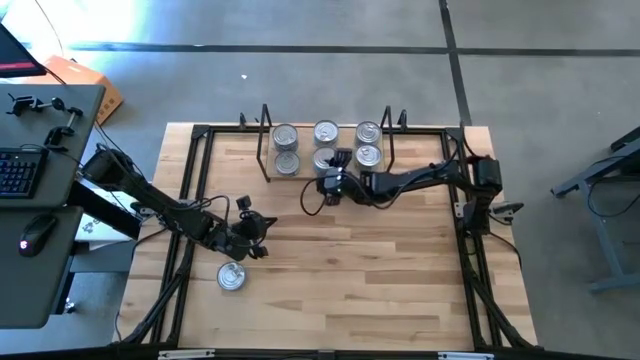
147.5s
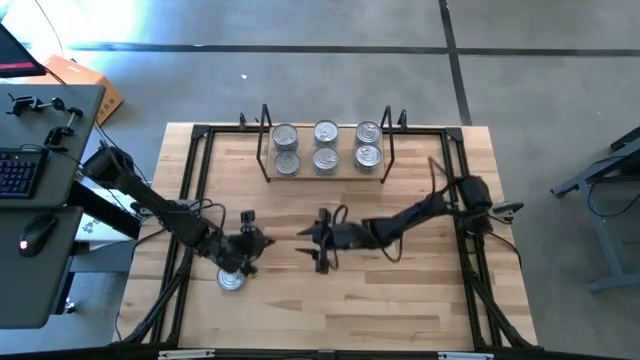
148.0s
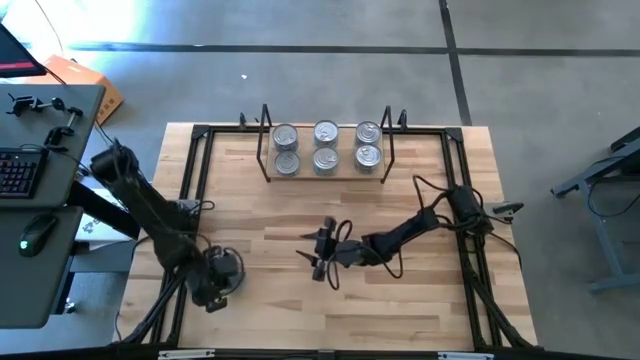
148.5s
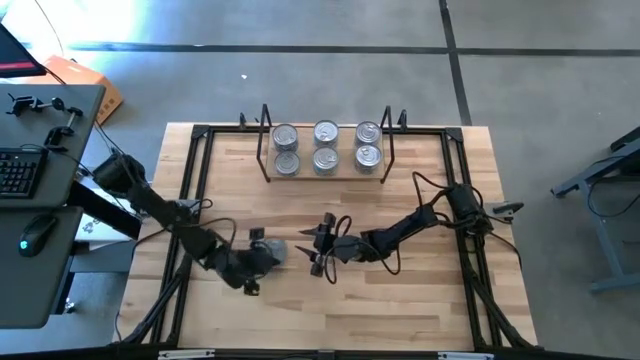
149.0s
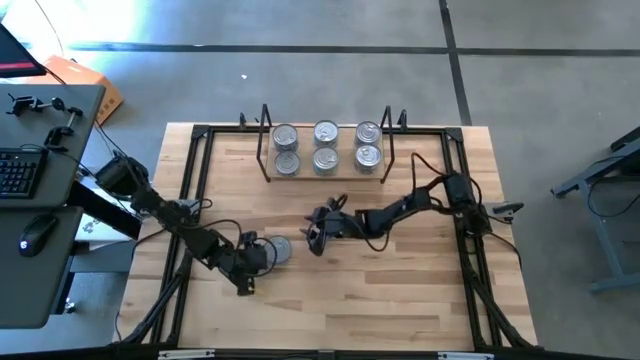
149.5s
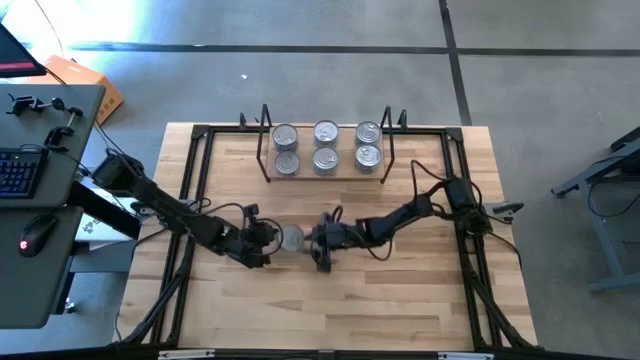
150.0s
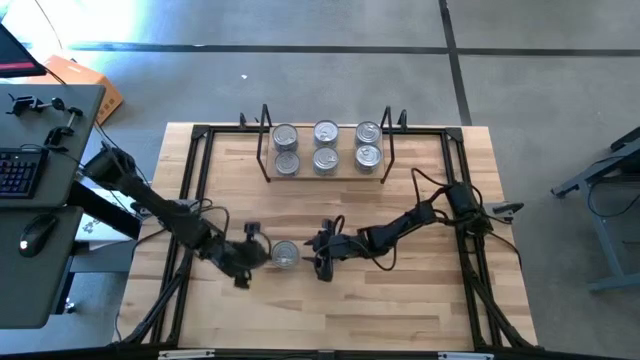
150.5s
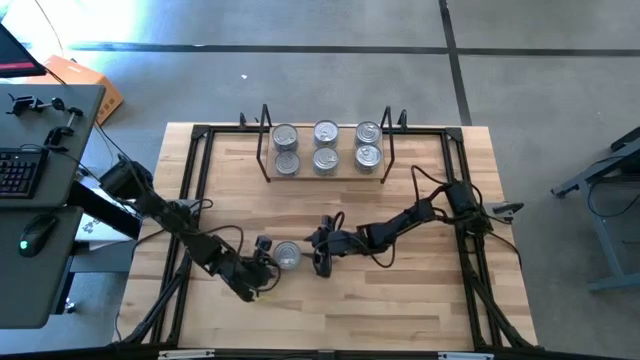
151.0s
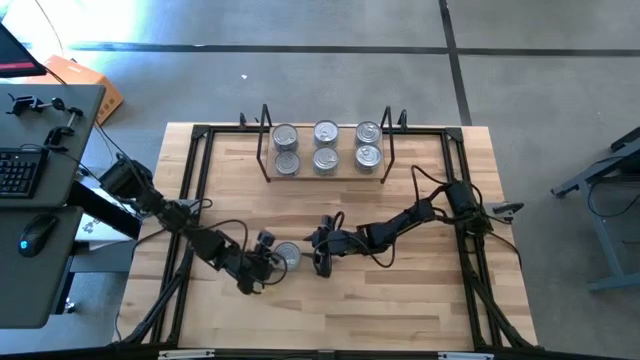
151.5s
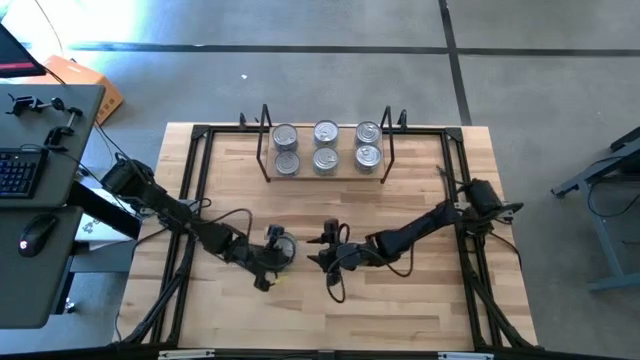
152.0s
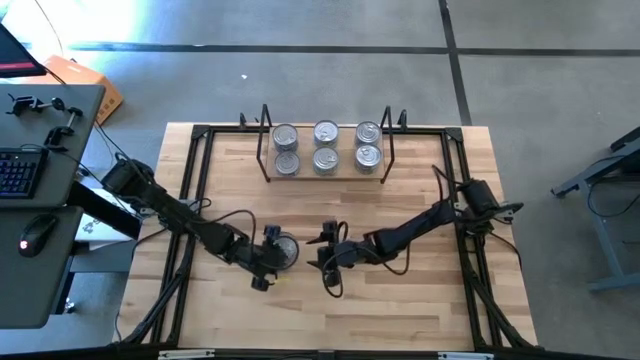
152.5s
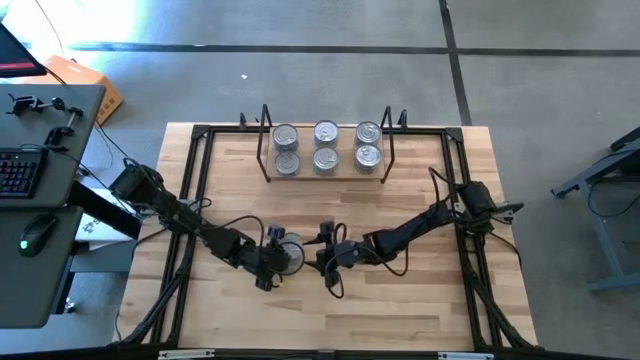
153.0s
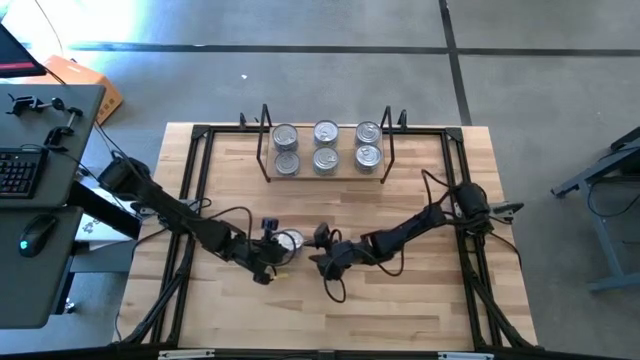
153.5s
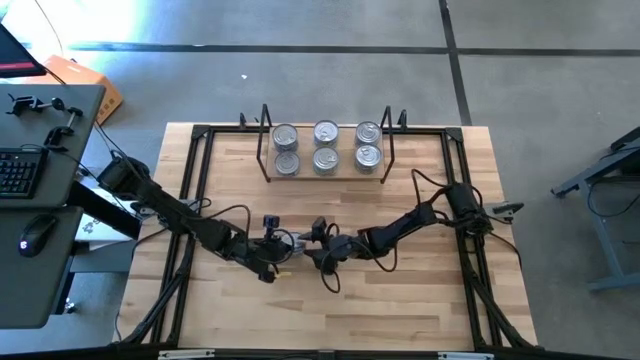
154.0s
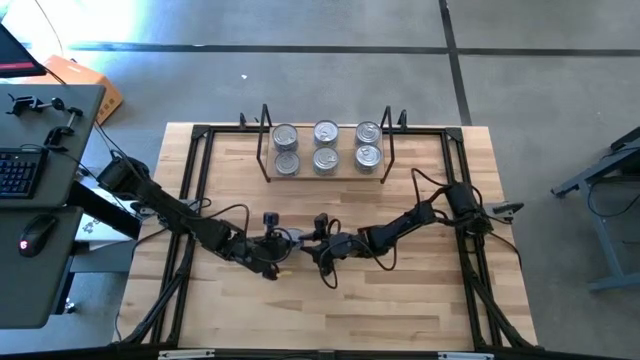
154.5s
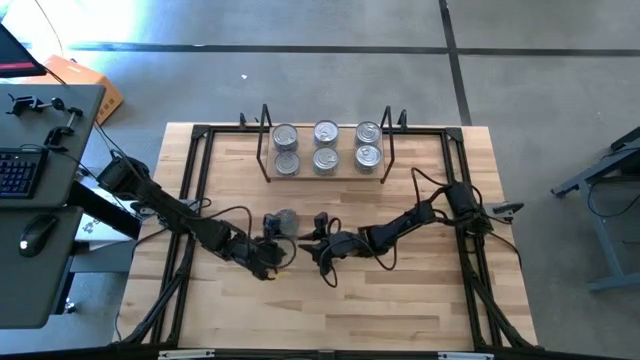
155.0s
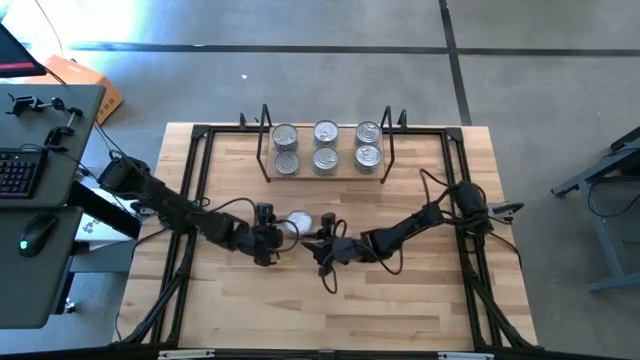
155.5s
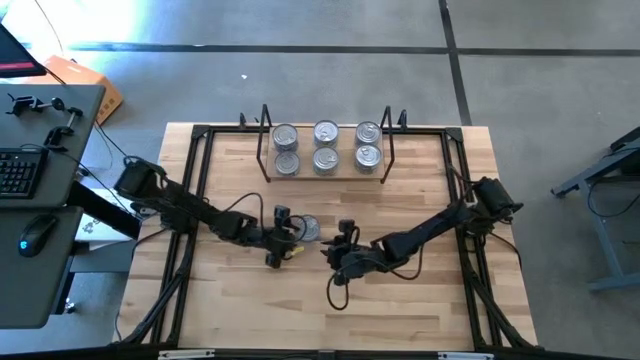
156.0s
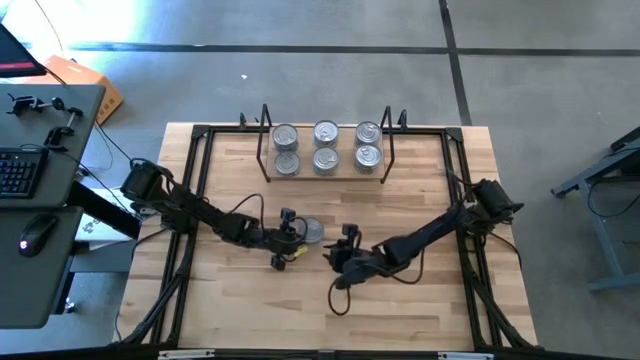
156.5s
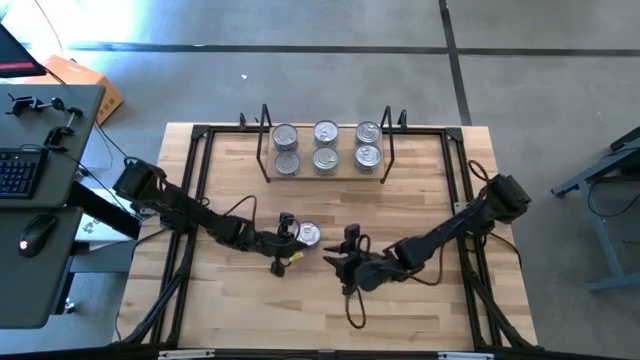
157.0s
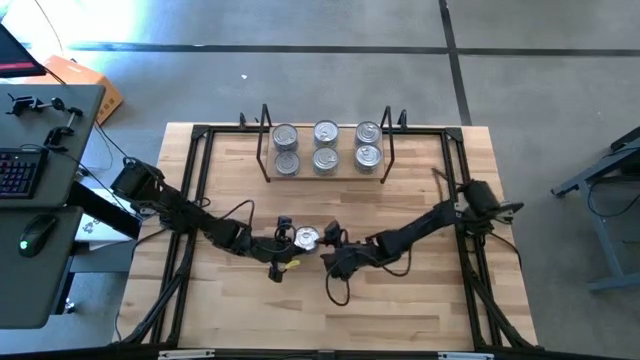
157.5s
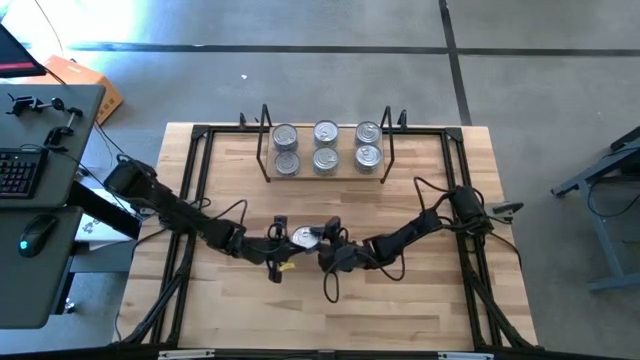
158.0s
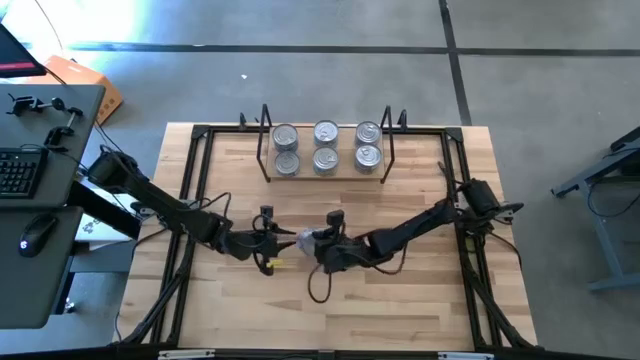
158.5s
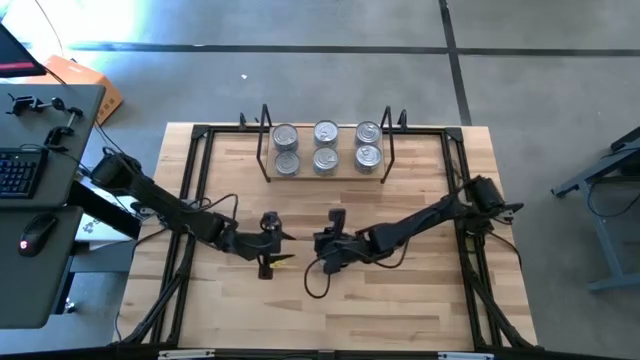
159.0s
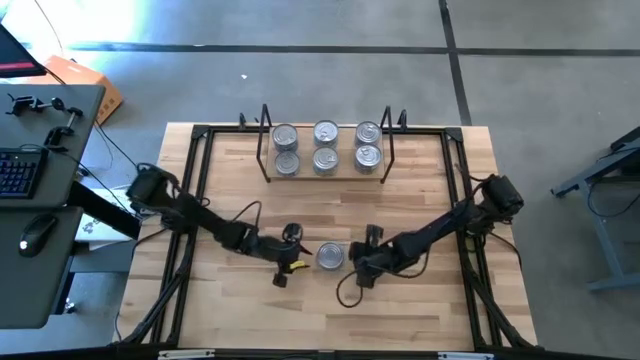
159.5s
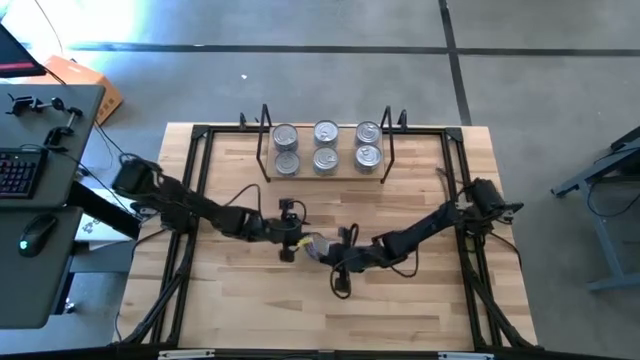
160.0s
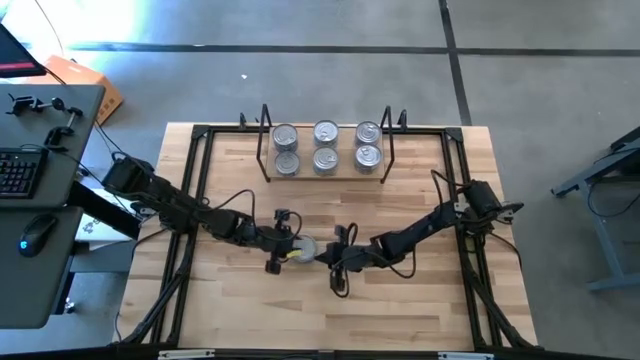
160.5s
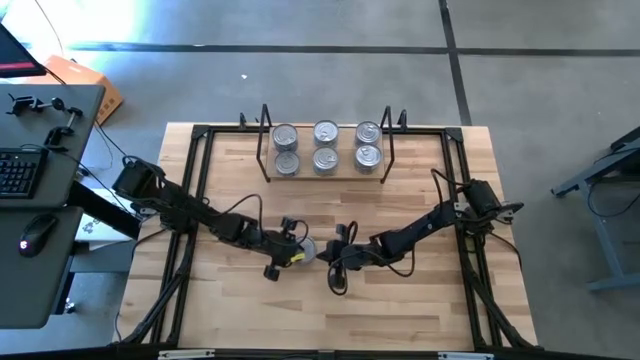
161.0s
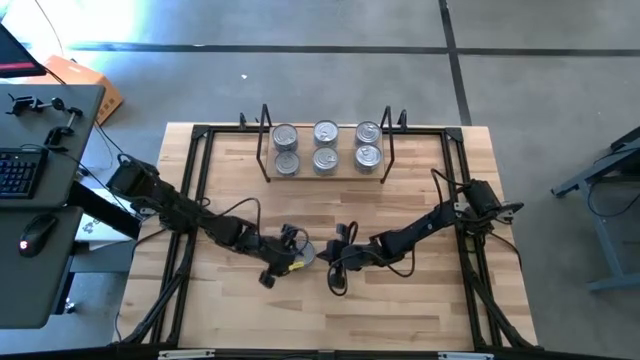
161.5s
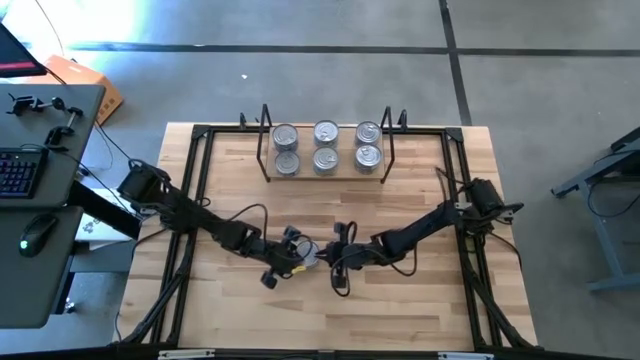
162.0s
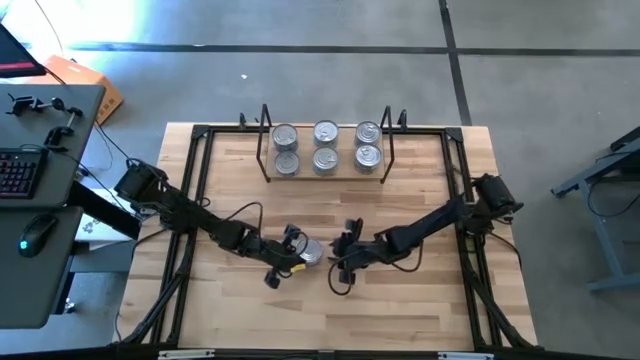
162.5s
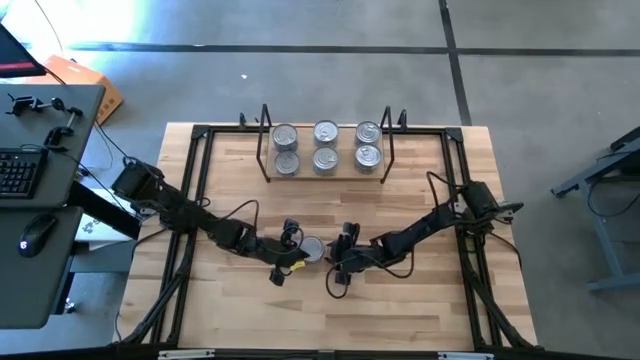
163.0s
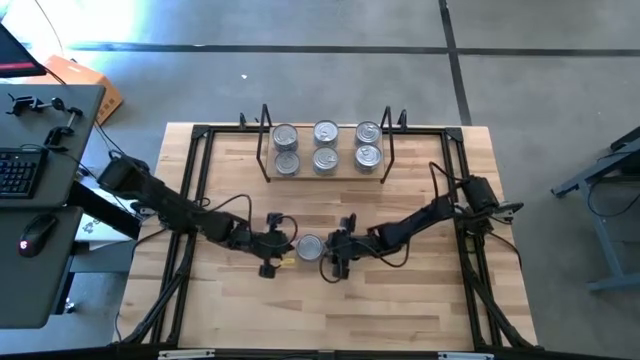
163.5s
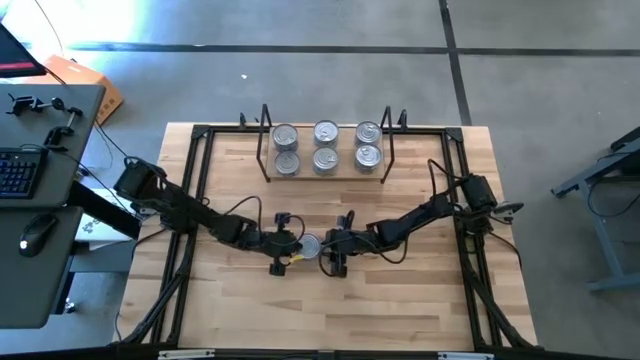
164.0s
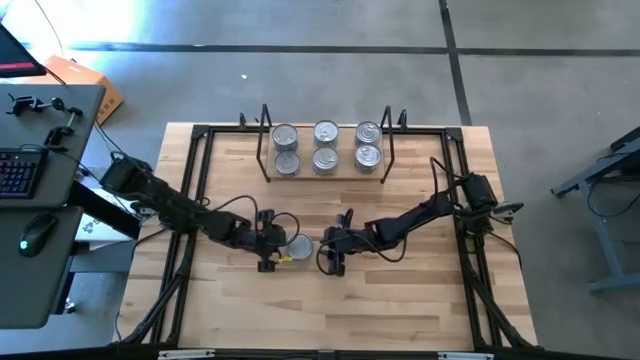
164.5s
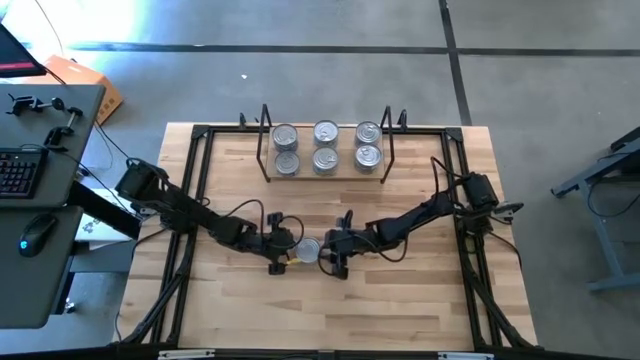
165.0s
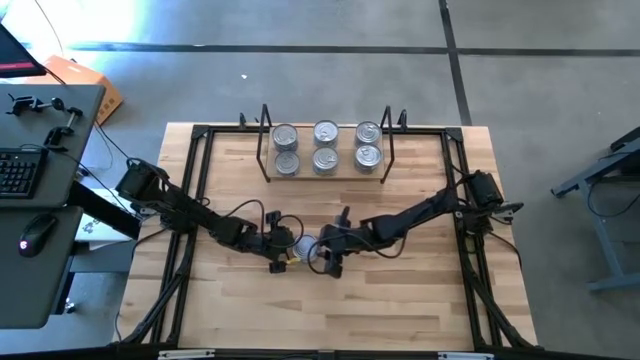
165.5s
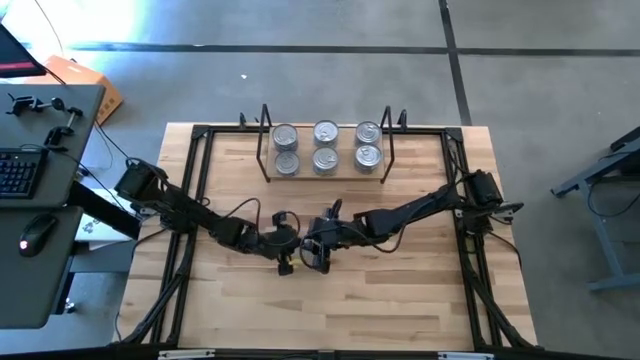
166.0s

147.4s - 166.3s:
Task: Stack canned seafood by type on shelf
Stack the blue tuna can on top of the other blue tuna can on the shelf

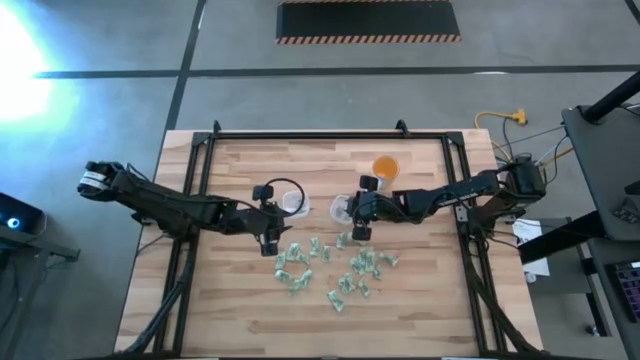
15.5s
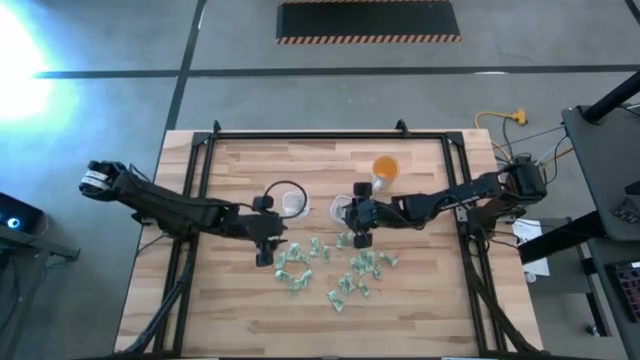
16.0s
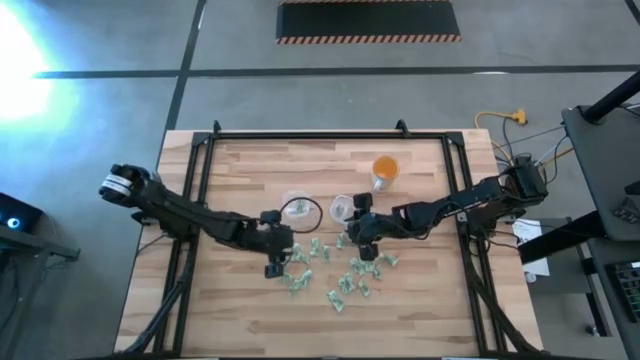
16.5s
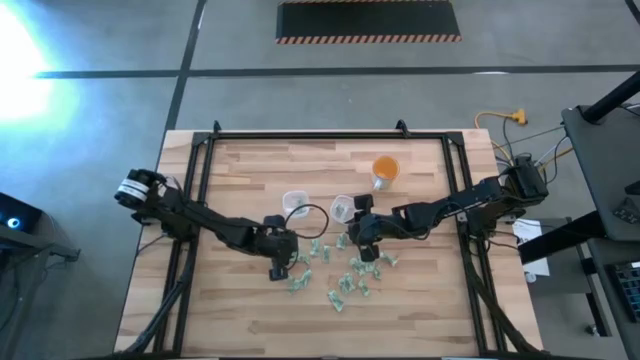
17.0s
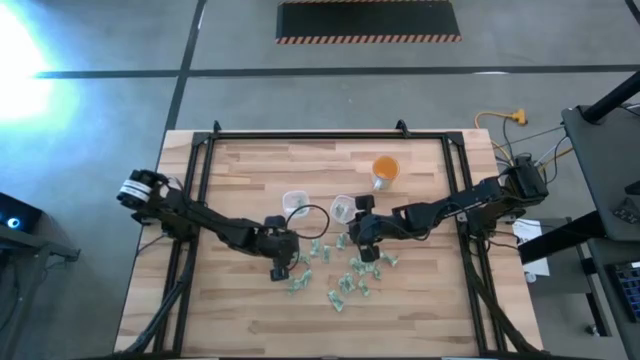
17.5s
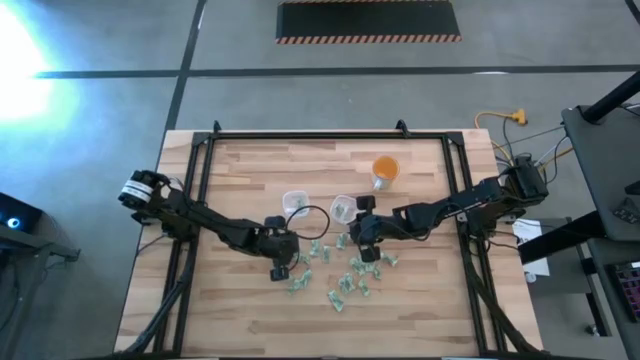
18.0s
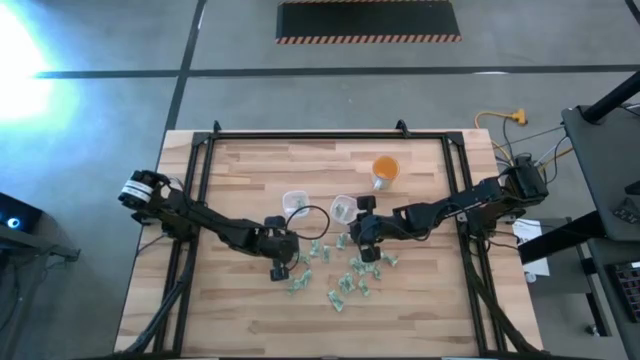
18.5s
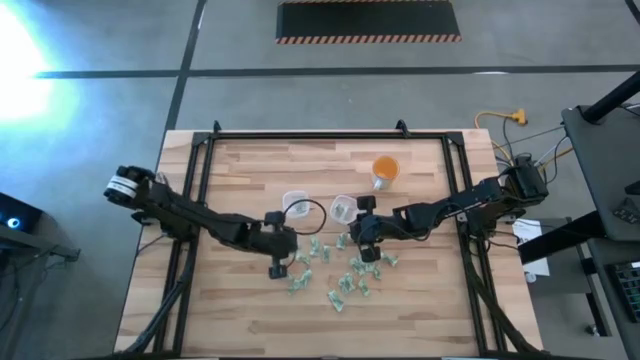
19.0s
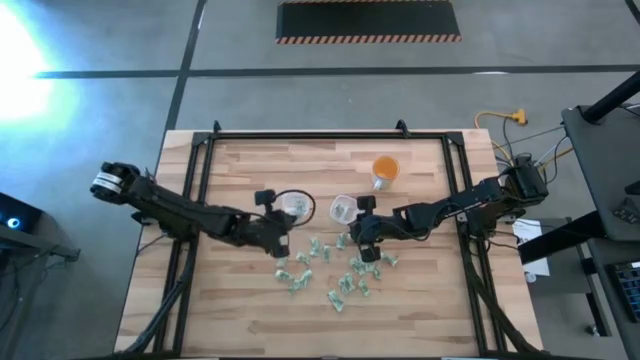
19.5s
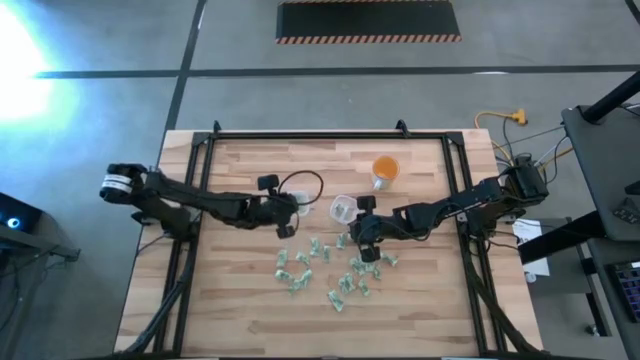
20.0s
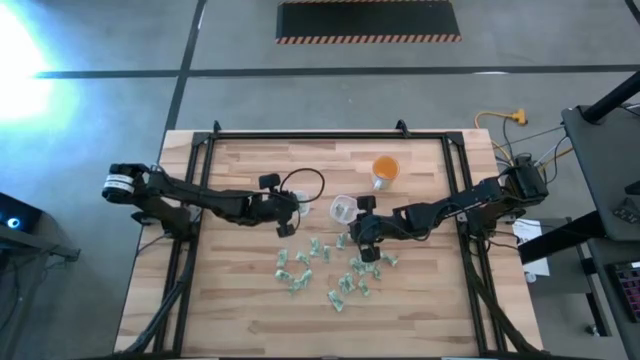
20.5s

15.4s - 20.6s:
Task: Pick and place items into bin
Put the white stevia packet into the left transparent bin
